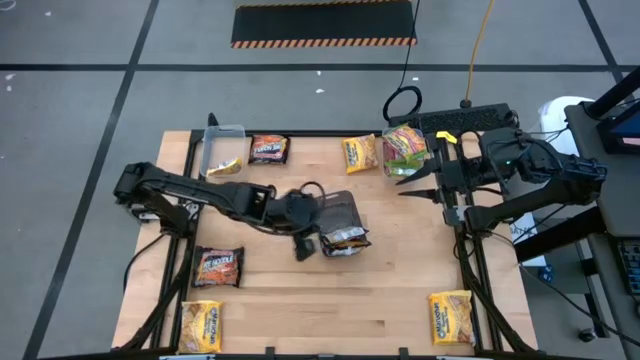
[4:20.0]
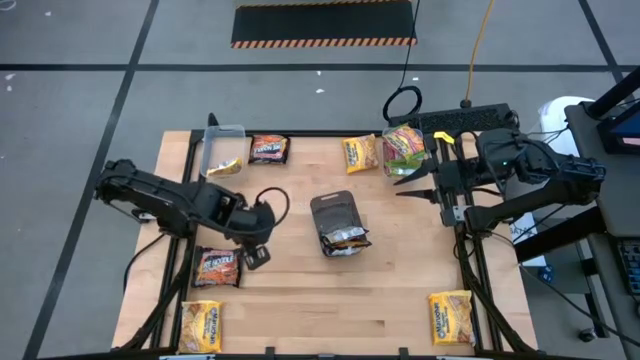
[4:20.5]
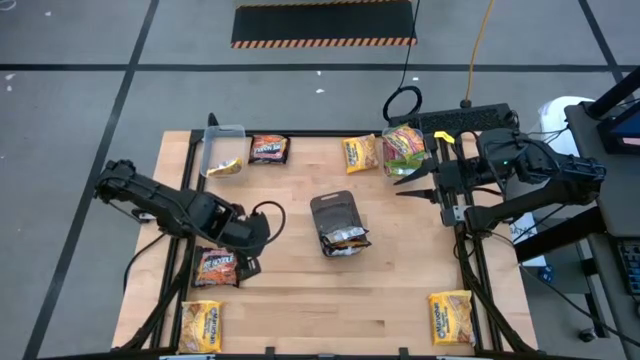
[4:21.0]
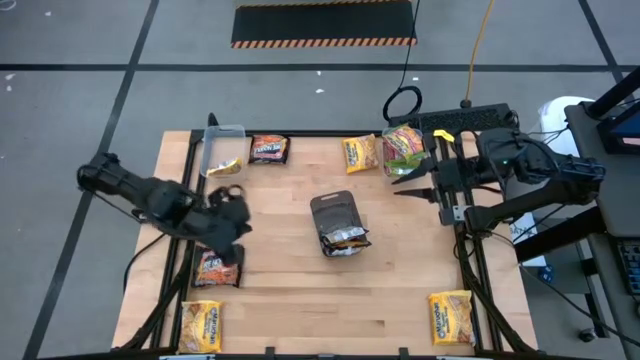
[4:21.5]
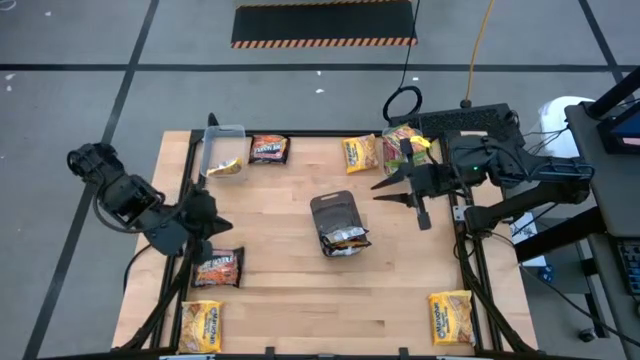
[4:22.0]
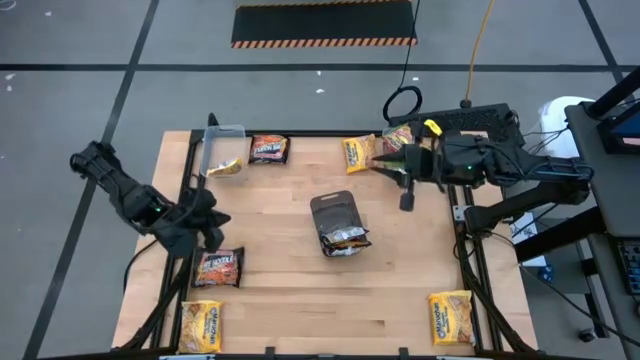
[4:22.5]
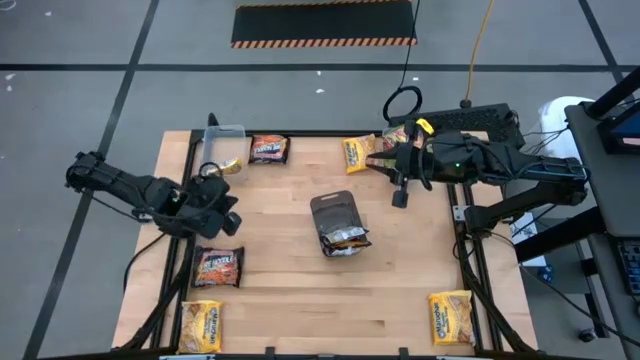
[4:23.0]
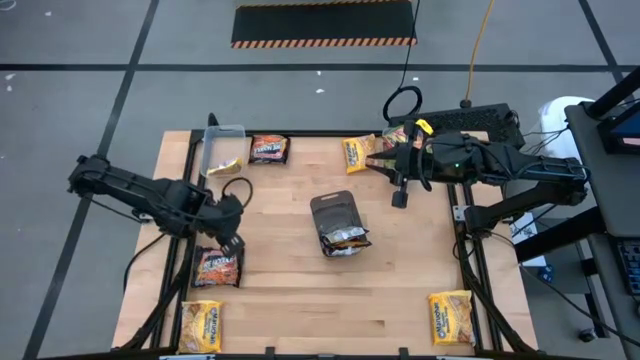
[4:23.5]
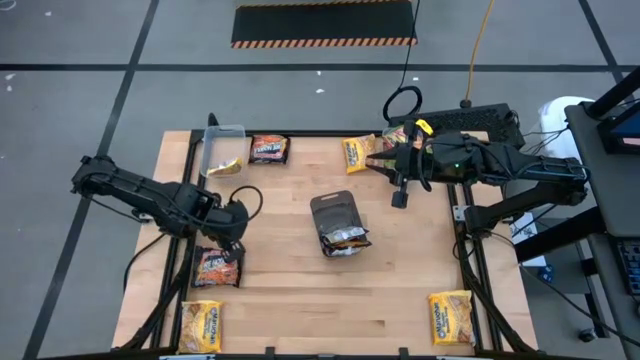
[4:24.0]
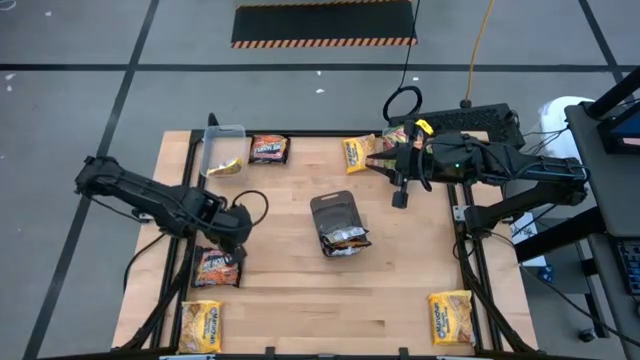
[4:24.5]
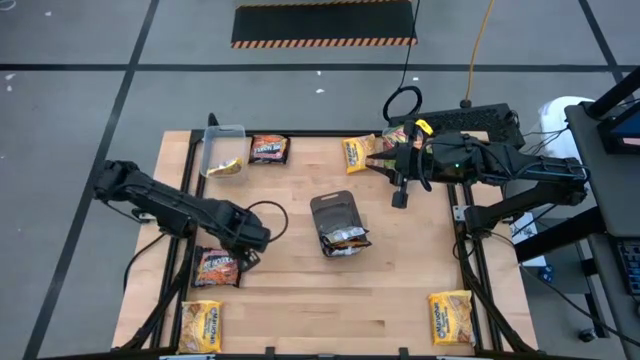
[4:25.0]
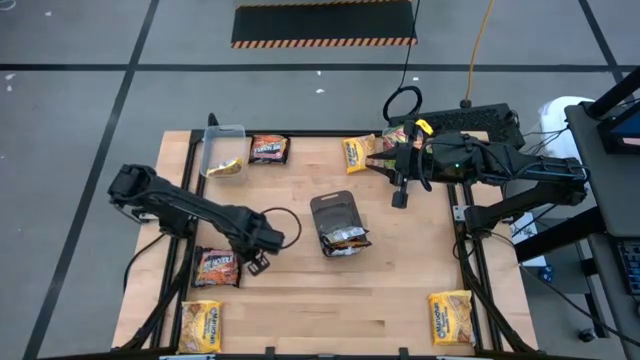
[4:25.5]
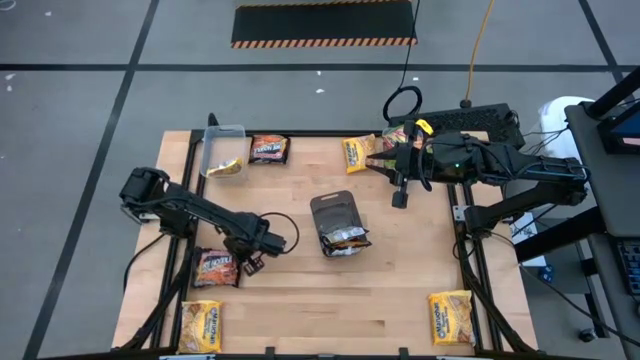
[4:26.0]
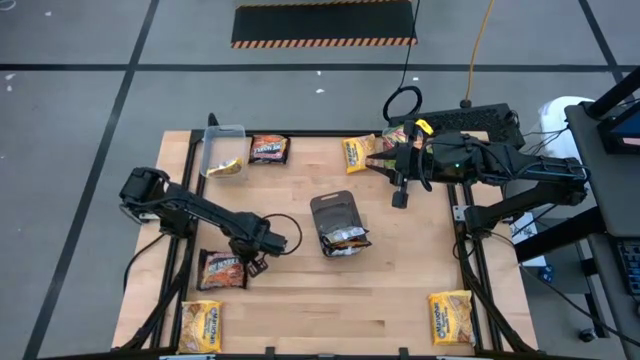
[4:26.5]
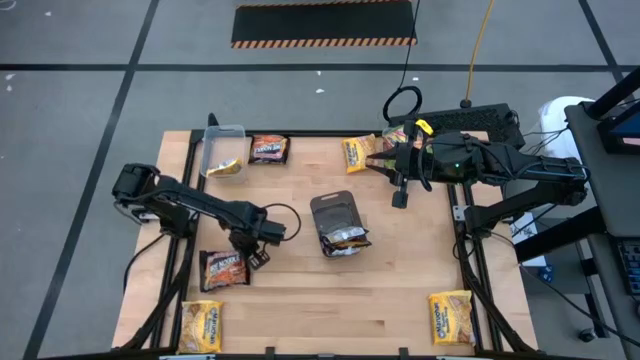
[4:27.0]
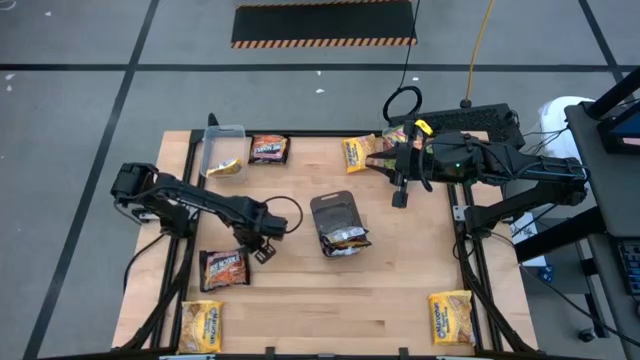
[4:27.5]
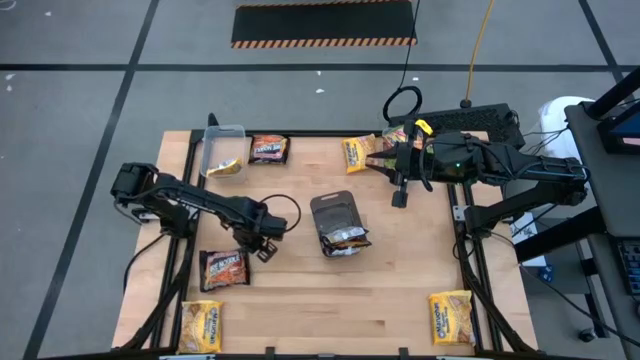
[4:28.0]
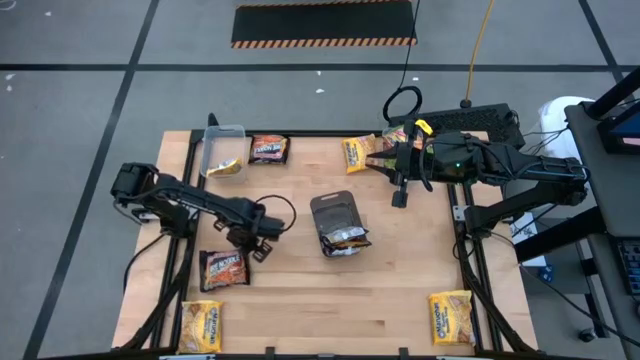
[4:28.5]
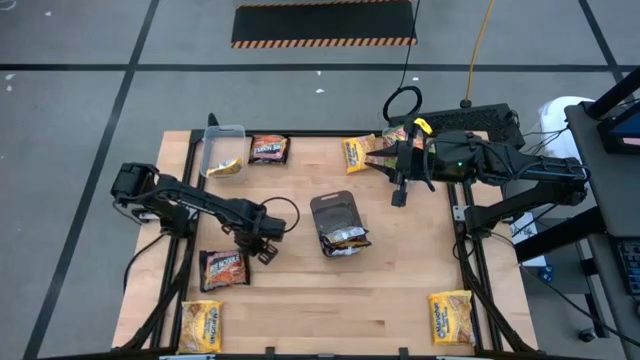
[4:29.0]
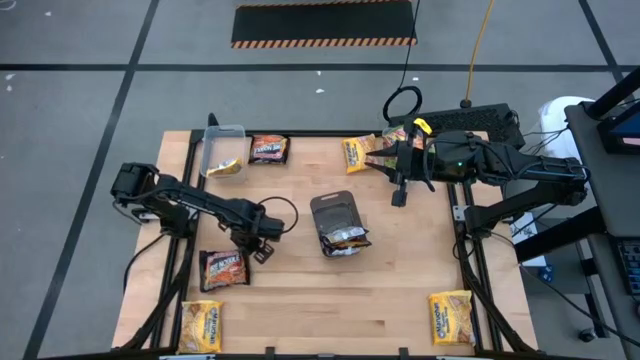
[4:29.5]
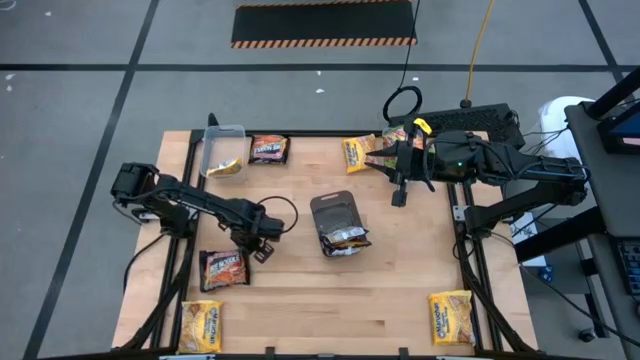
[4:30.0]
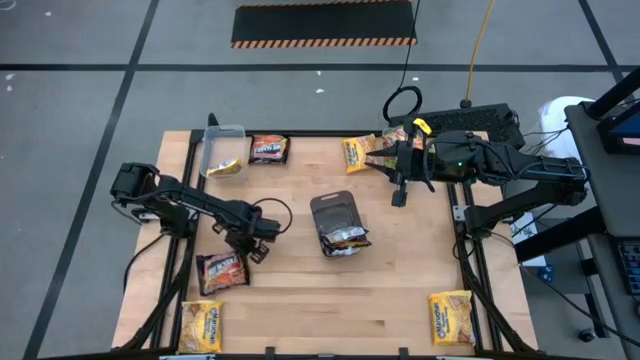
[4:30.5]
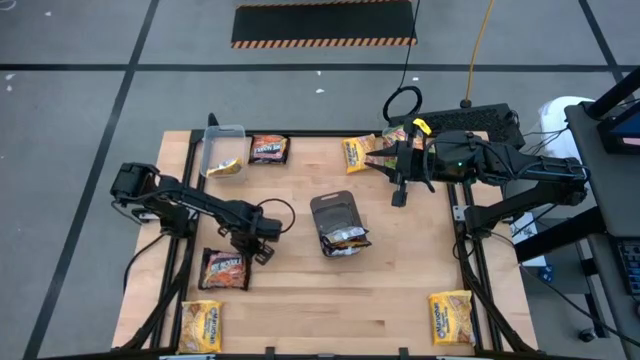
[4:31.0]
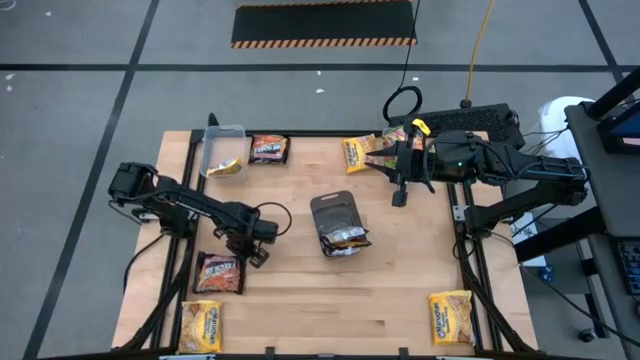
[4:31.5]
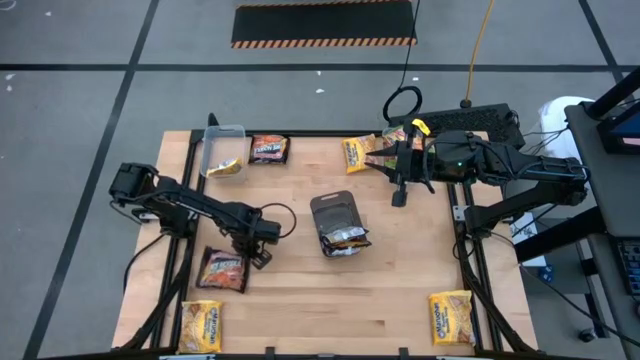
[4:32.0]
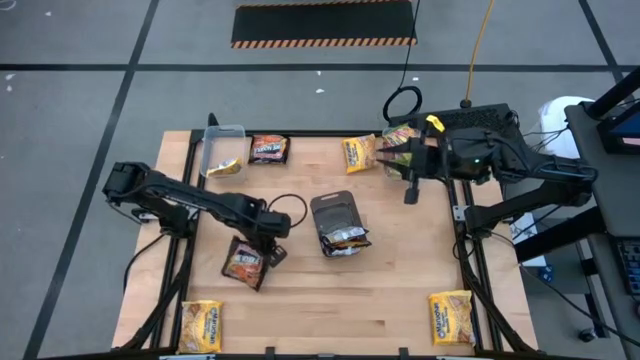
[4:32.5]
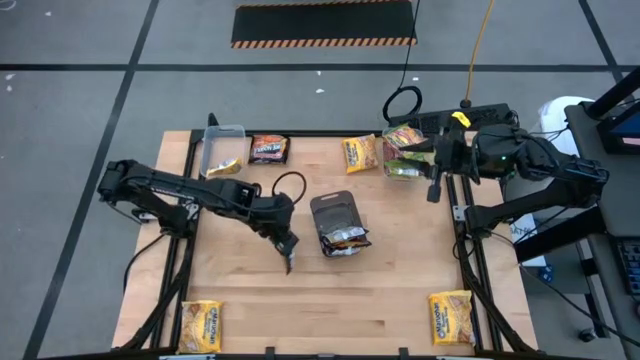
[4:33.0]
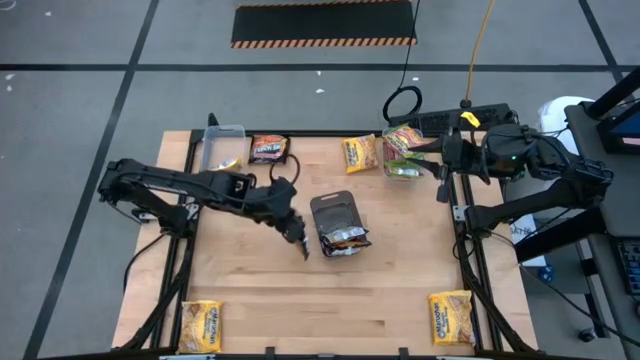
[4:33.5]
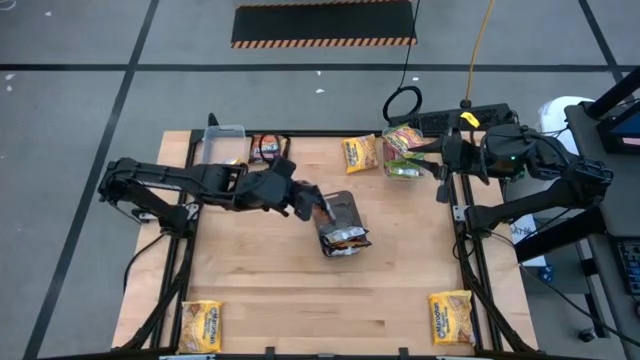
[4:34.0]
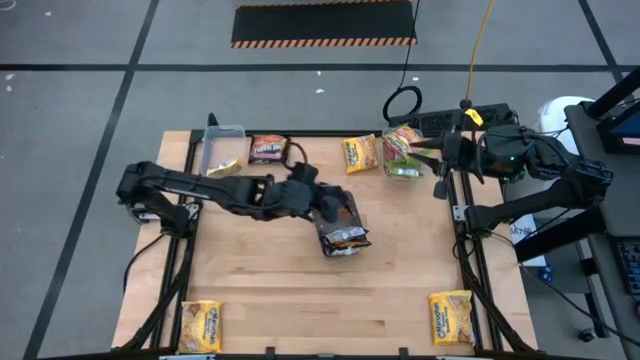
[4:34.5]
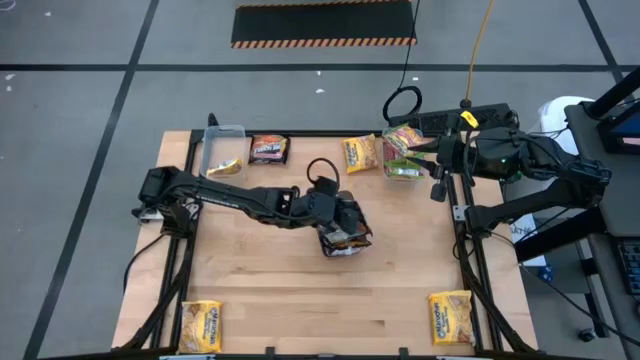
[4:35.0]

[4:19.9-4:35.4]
Task: Sort Maruchan noodles
Put the bottom black noodle pack into the black bin

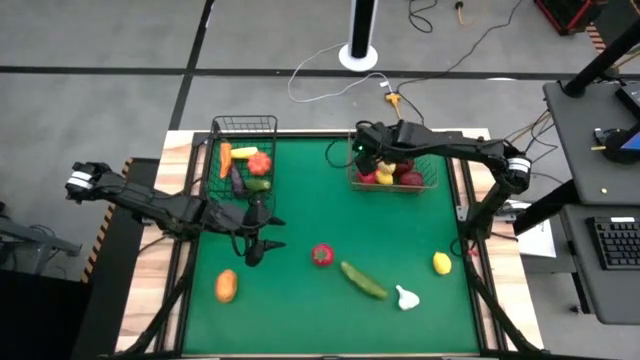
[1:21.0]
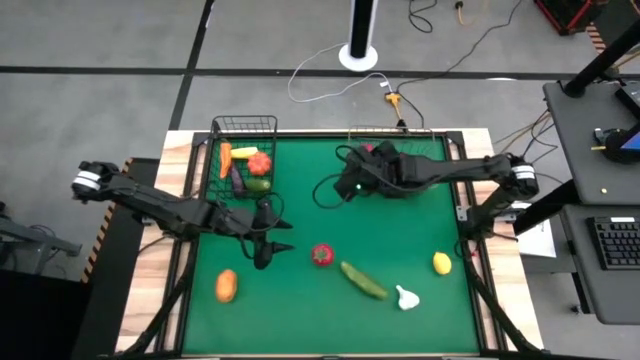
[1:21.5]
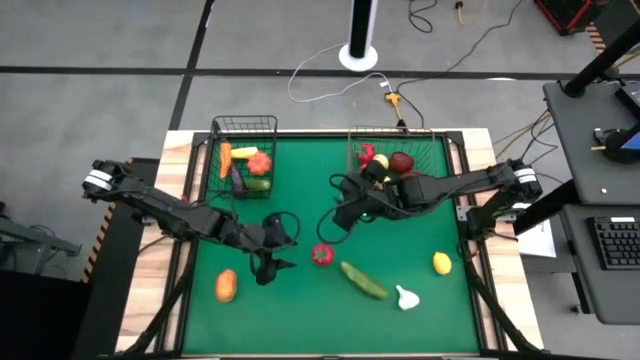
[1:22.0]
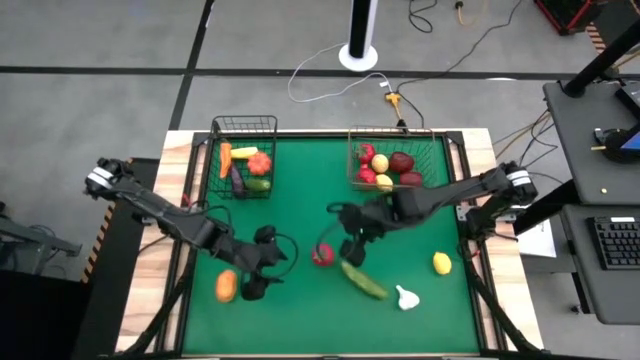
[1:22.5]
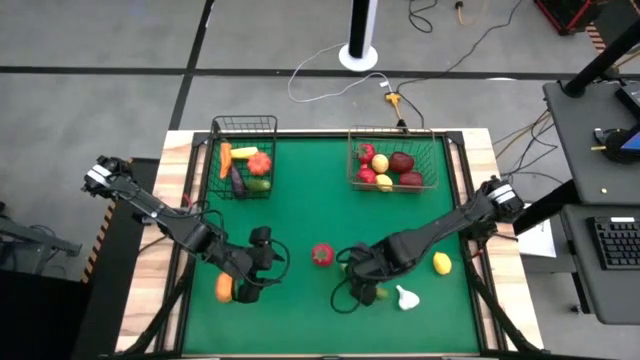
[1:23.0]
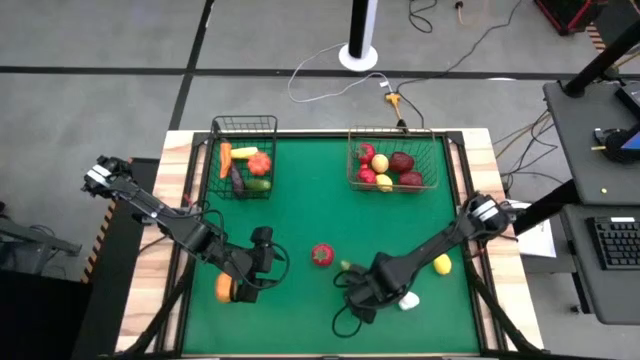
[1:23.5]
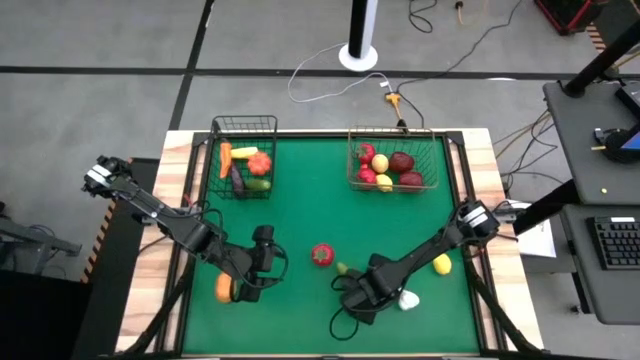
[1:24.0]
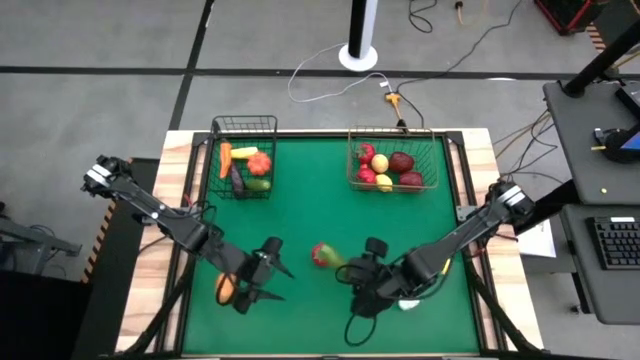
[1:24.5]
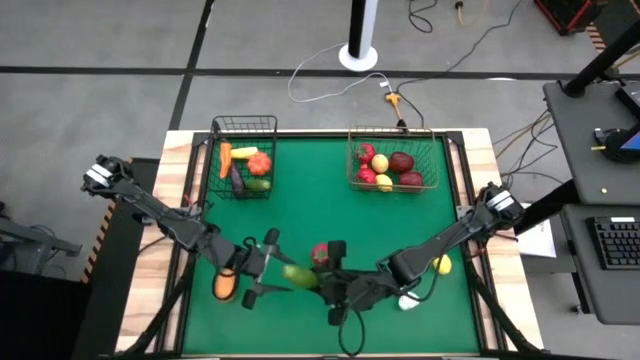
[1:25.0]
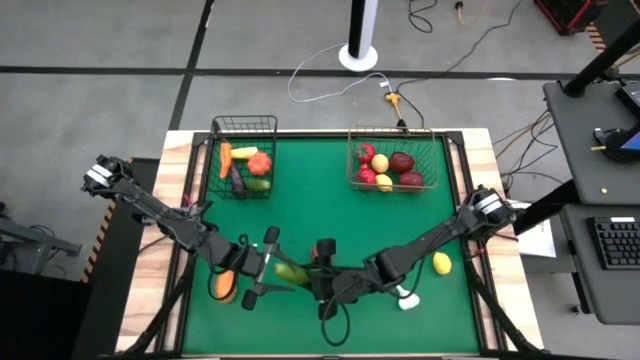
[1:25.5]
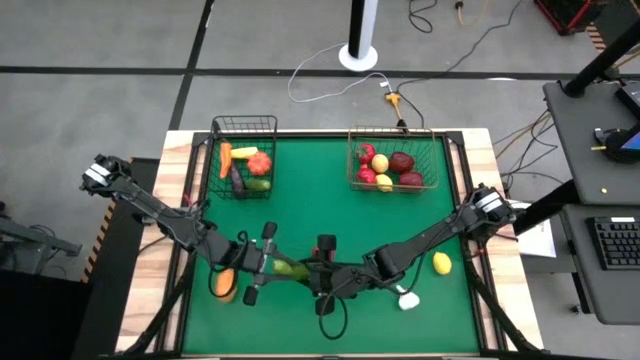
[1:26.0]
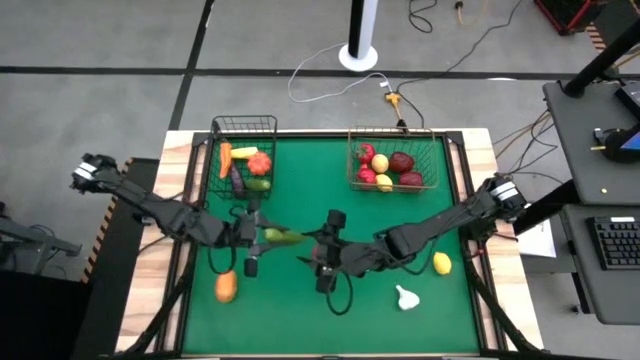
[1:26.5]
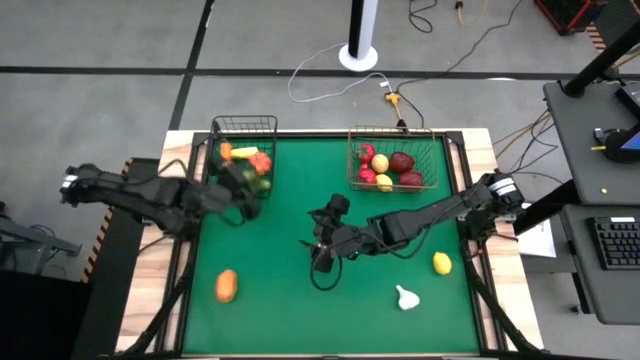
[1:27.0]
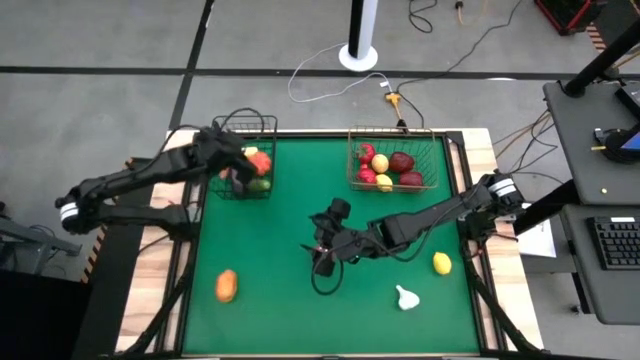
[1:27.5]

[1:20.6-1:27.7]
Task: Sort produce into baskets
Put the green cucumber into the left wire basket
